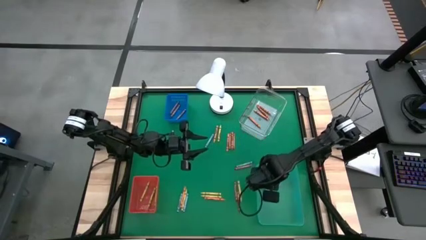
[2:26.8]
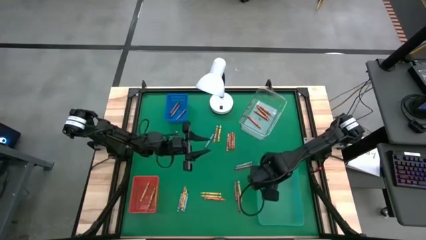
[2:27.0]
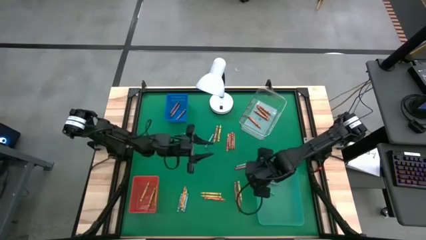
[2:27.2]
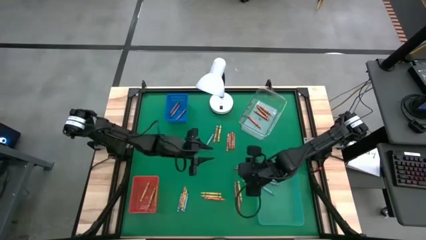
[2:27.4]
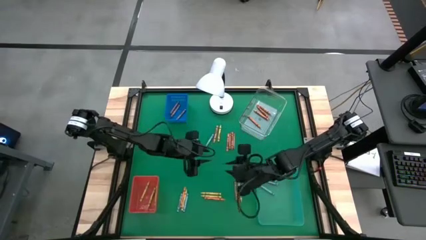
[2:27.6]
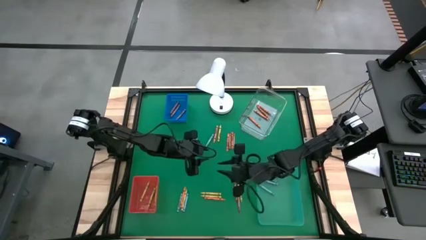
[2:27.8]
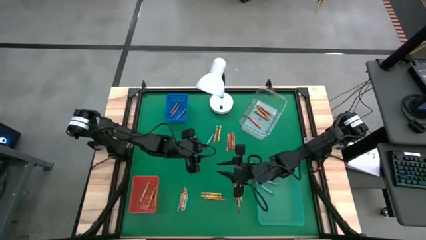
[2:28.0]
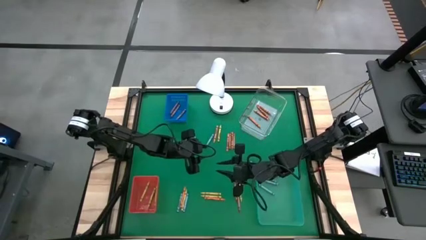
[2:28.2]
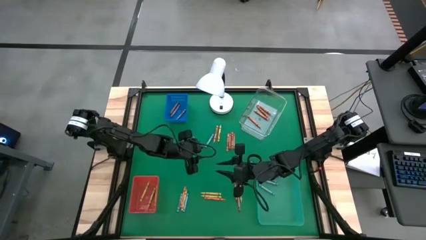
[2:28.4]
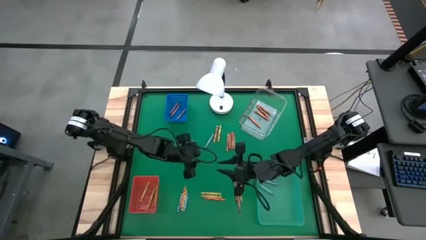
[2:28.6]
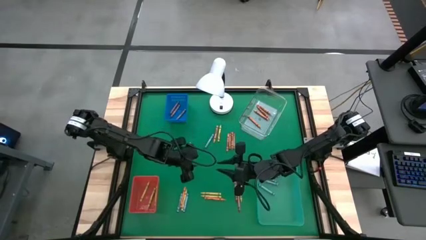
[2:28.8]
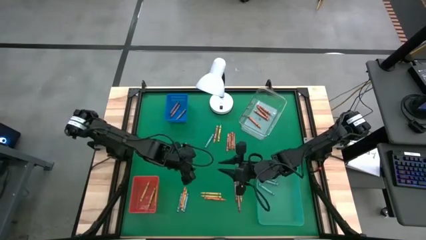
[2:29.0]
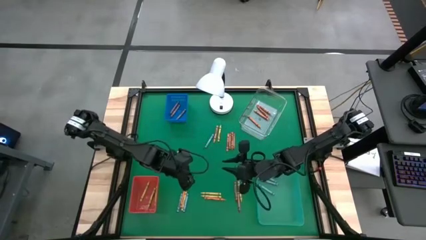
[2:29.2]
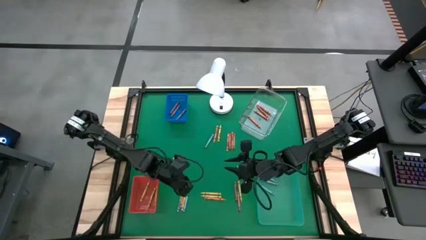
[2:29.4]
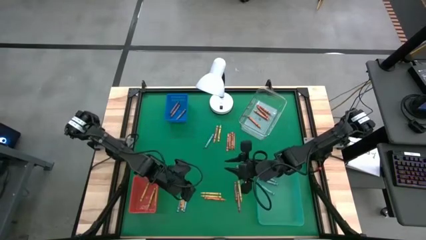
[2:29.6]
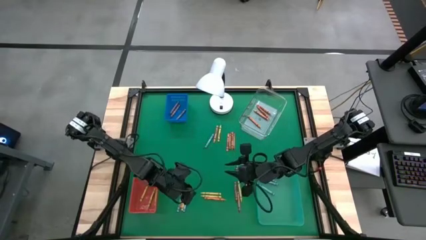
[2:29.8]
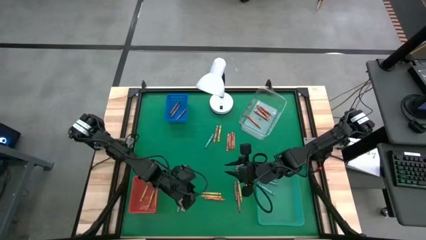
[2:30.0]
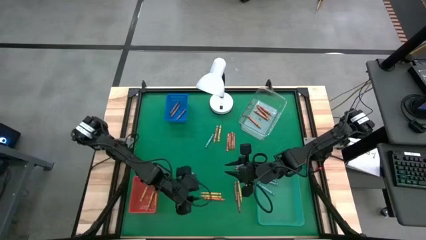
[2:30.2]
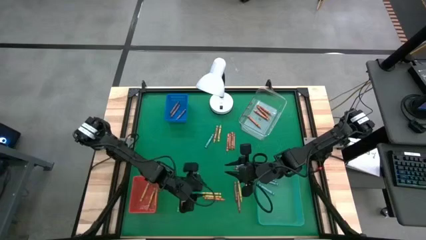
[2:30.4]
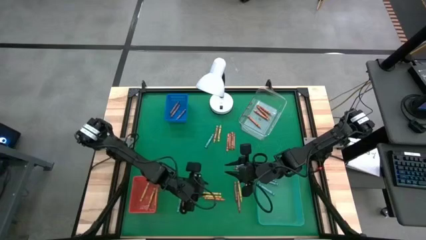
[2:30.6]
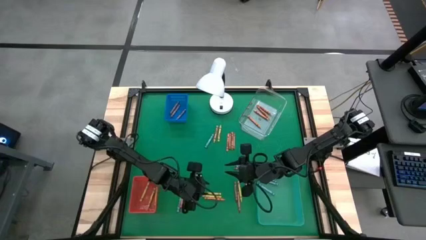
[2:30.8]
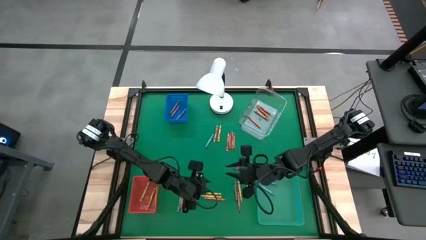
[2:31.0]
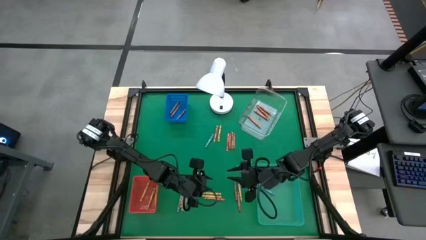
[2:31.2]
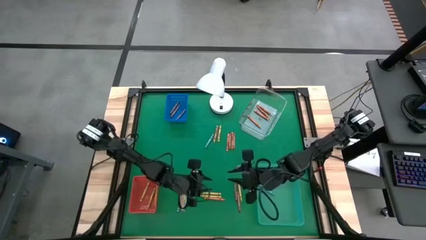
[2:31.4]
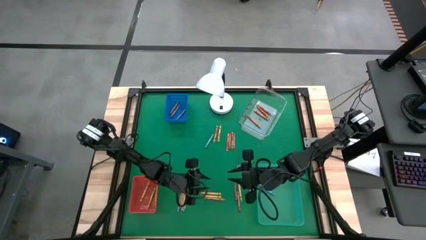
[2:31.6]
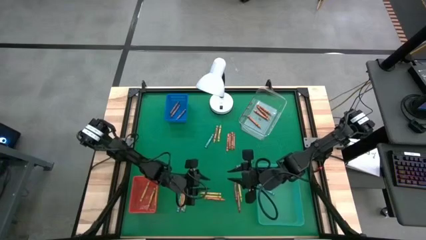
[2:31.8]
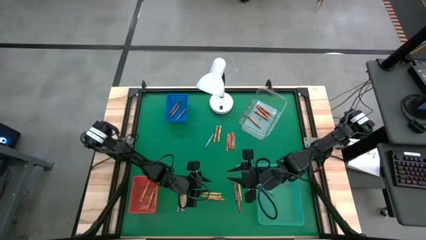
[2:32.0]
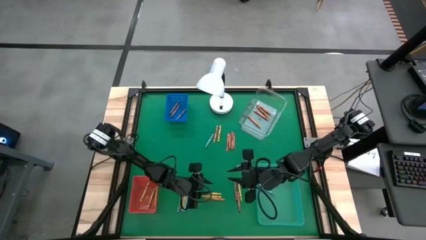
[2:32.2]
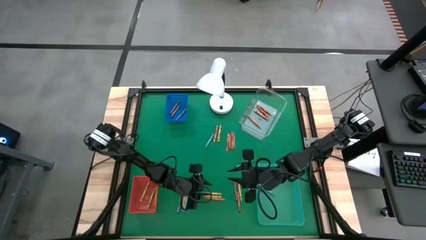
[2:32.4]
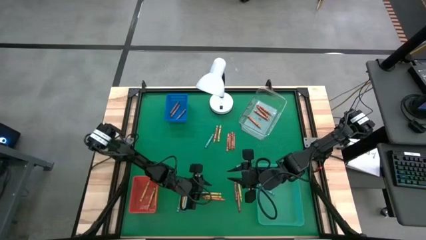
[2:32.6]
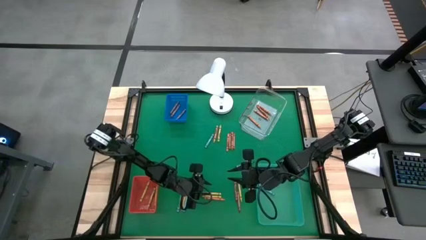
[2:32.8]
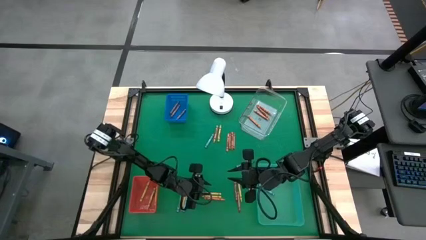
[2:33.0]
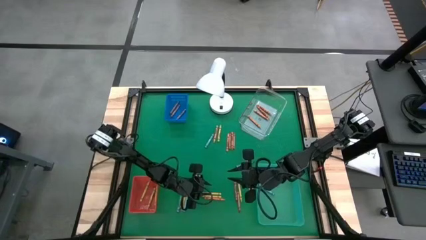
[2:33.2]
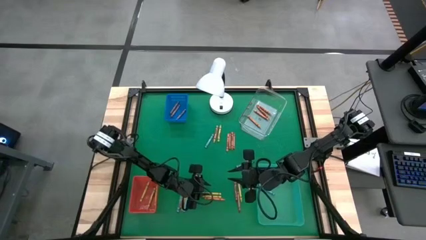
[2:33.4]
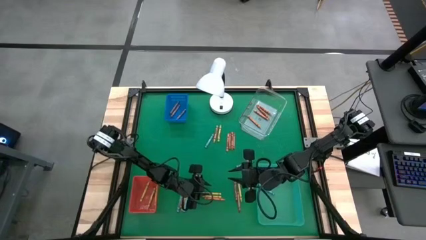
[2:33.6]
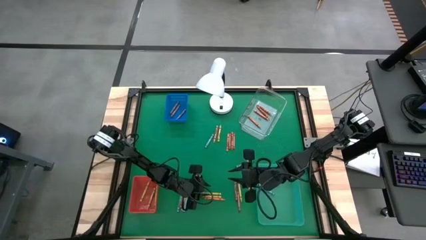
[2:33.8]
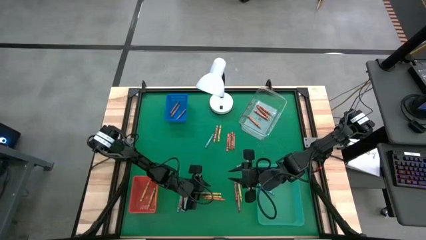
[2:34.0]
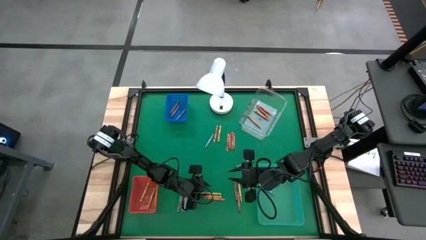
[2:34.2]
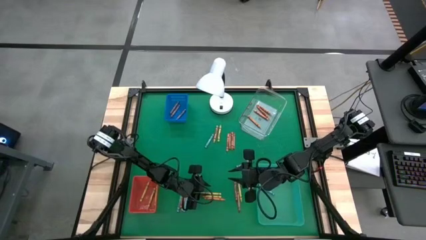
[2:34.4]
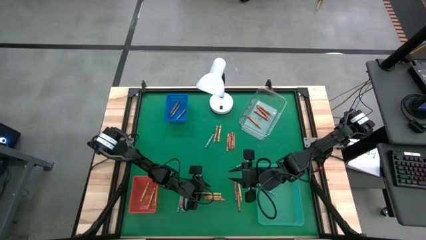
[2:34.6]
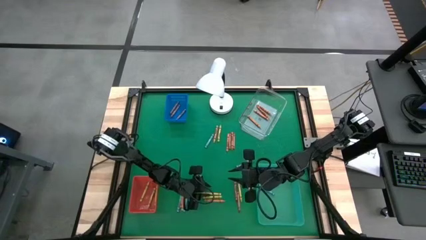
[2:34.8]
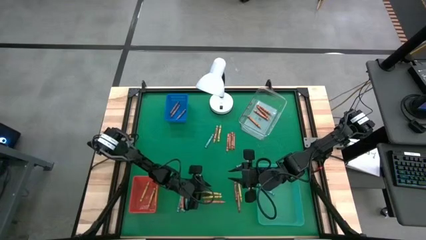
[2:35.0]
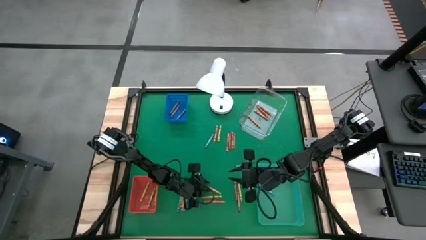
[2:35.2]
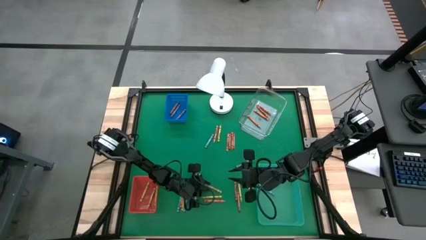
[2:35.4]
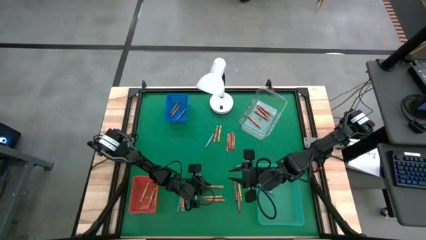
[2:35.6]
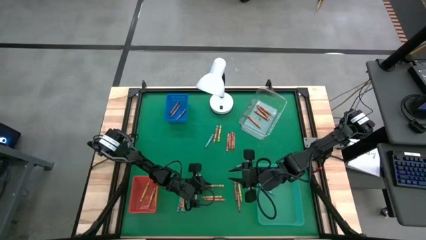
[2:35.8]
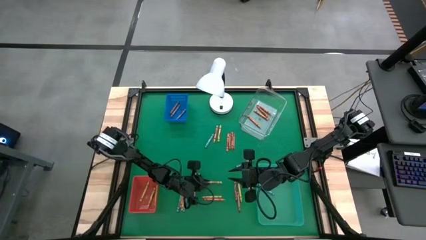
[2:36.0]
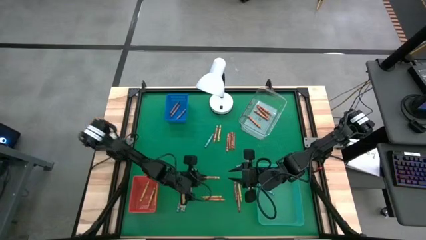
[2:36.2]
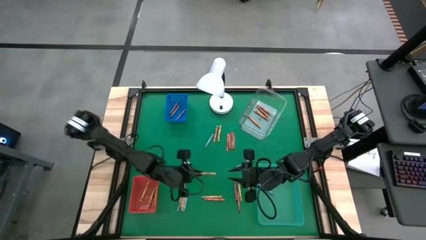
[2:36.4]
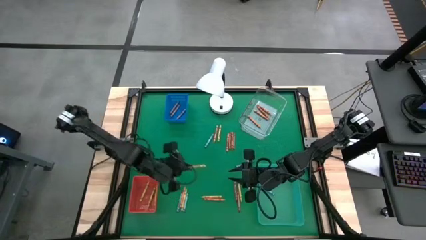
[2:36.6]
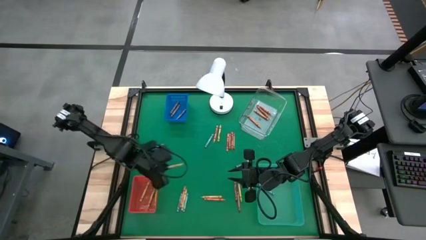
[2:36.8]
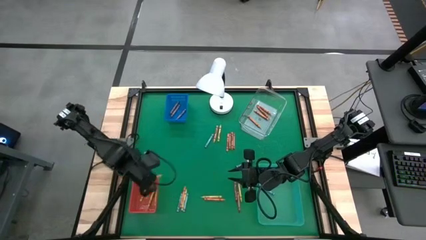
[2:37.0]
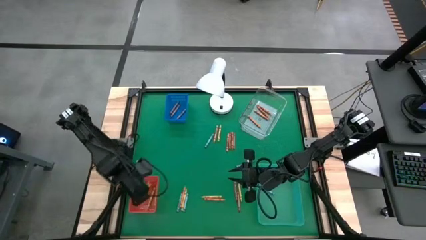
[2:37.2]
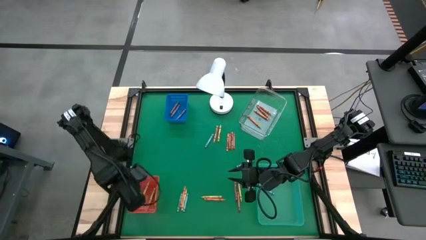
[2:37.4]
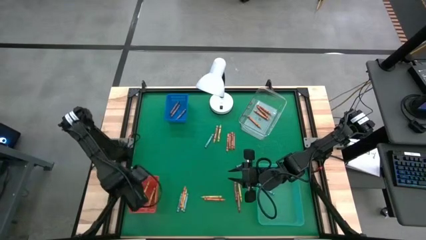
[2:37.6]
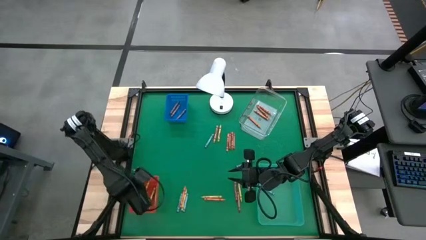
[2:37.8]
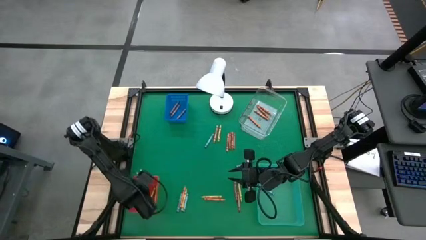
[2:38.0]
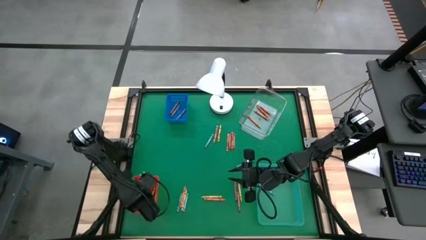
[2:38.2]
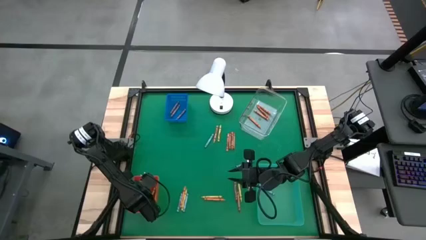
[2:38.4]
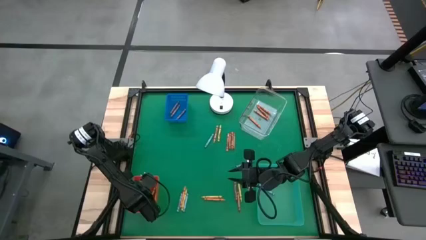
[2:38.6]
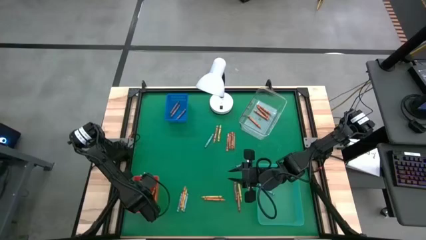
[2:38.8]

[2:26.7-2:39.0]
Task: Sort crayons
Put the yellow crayon into the red bin
